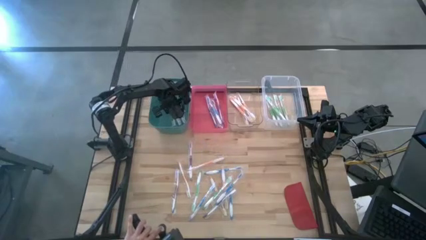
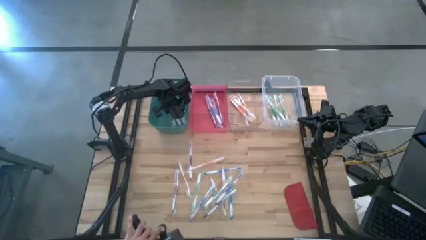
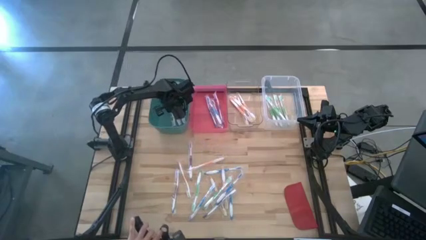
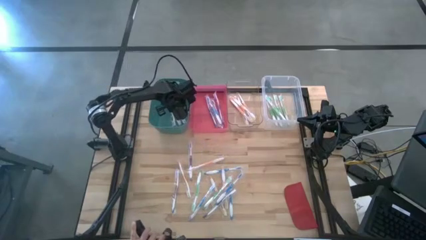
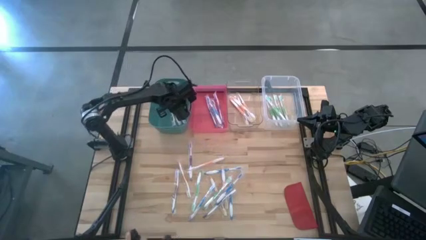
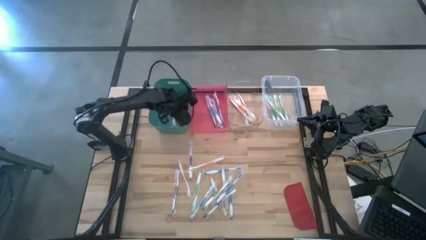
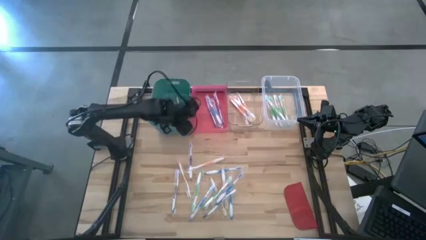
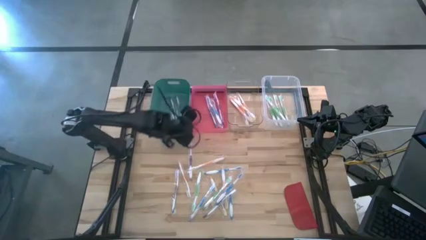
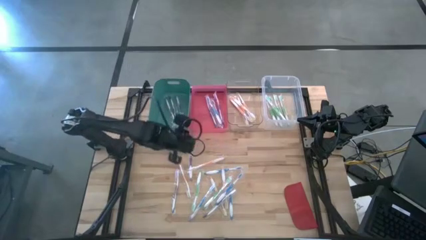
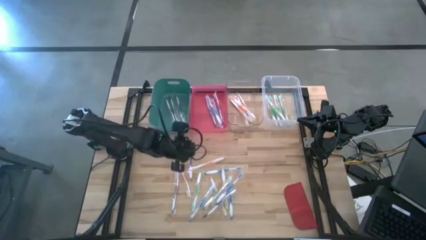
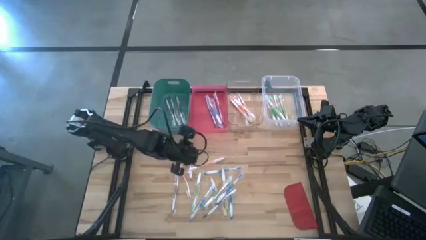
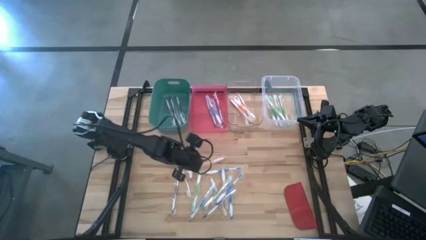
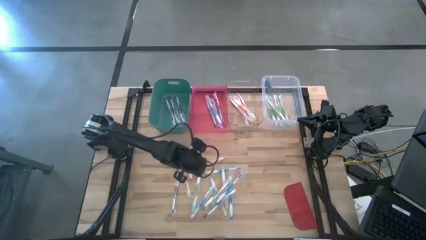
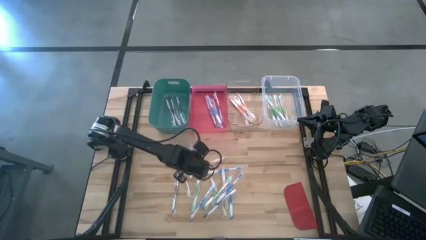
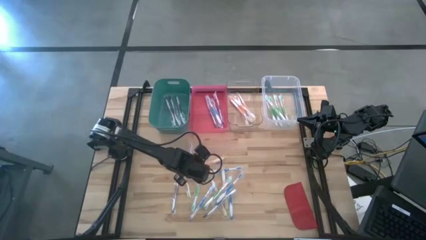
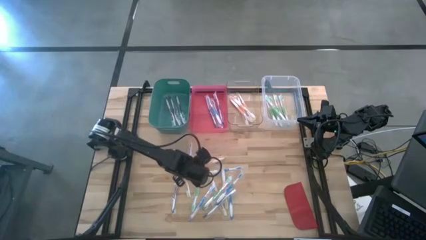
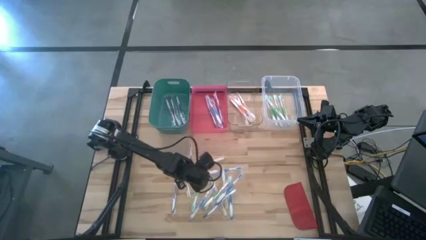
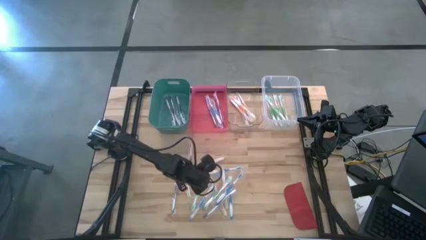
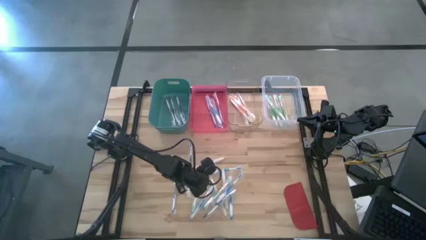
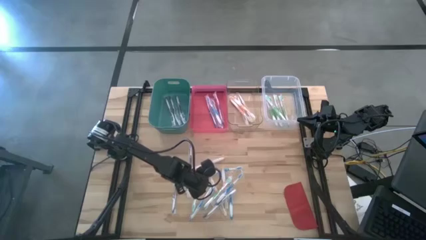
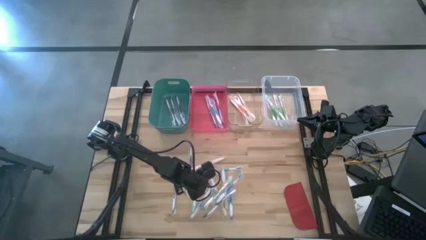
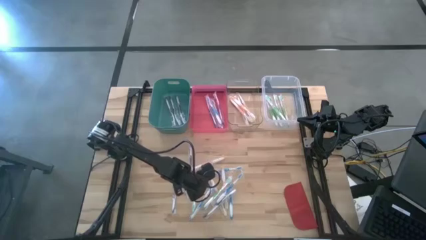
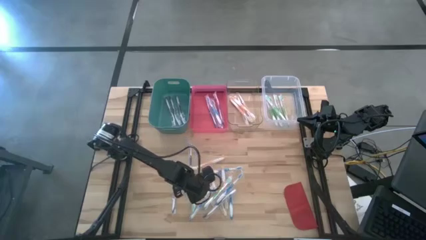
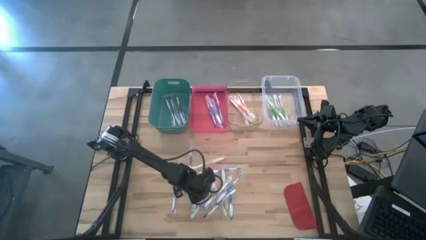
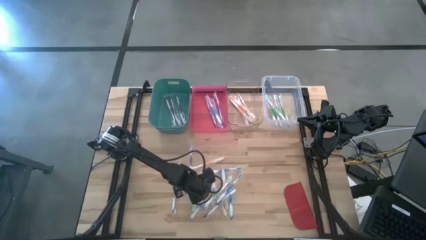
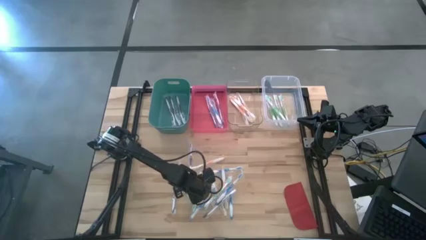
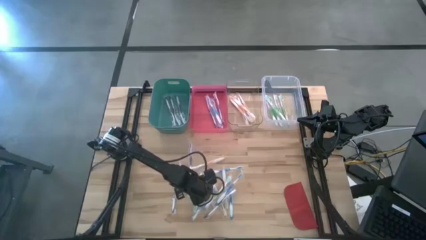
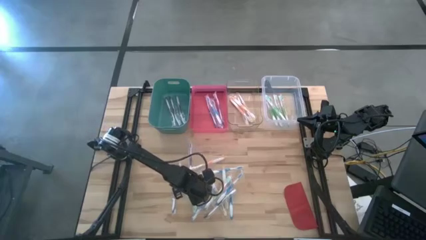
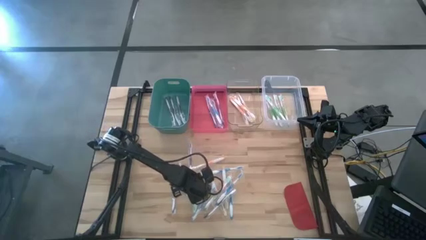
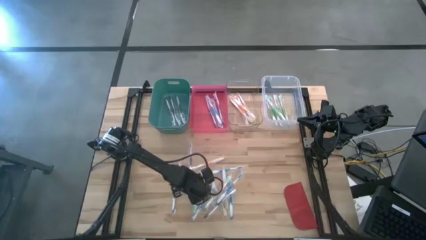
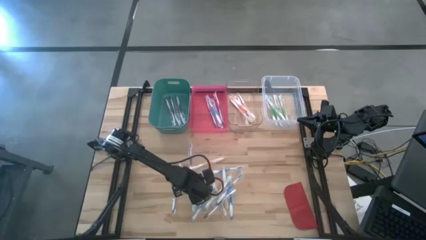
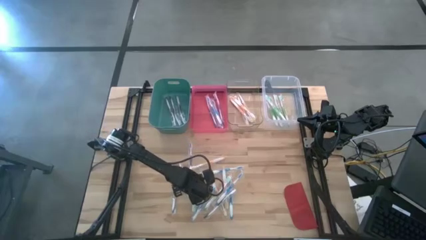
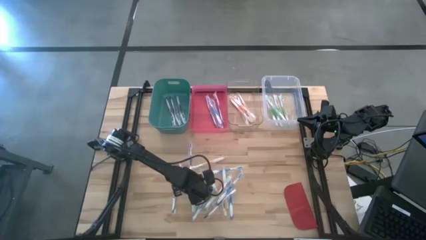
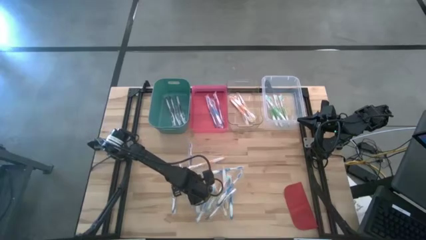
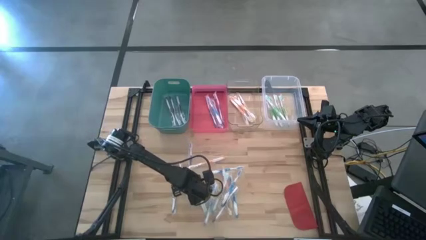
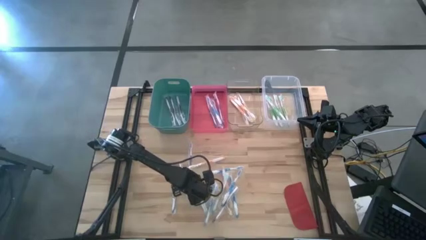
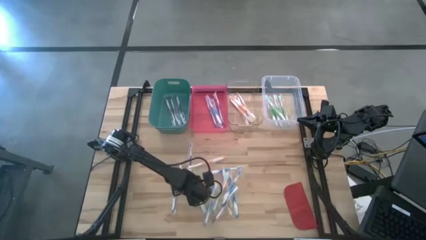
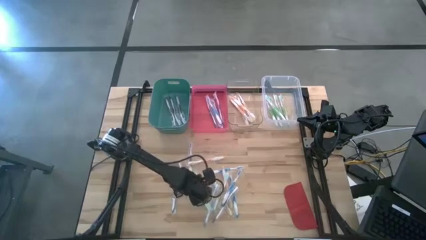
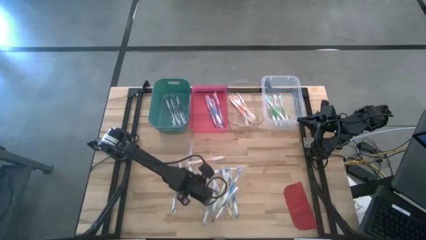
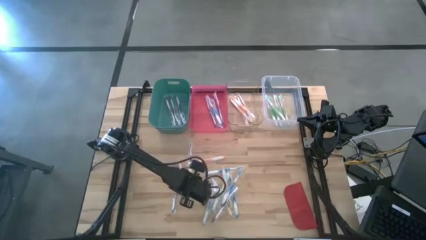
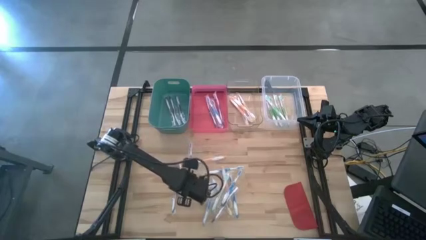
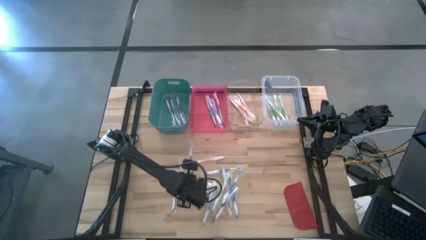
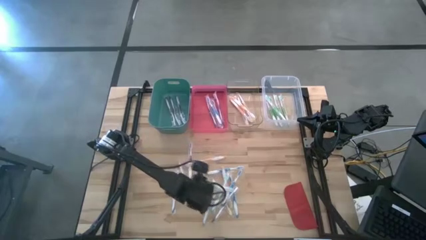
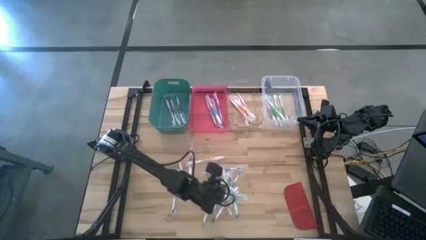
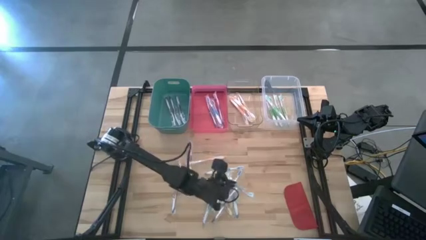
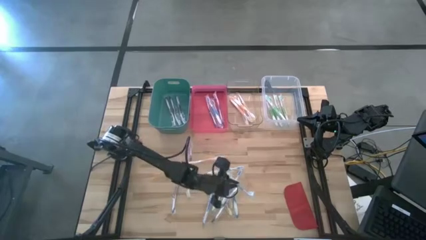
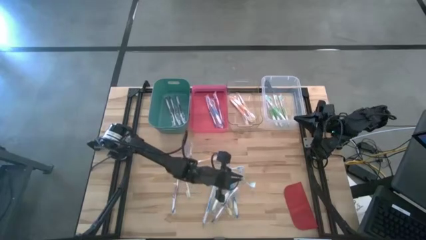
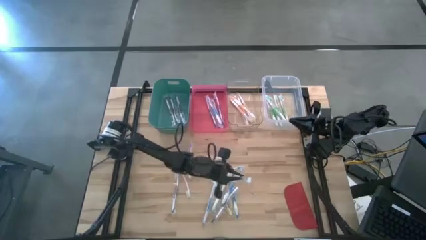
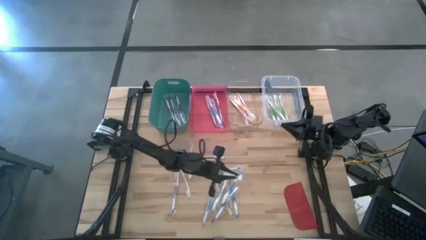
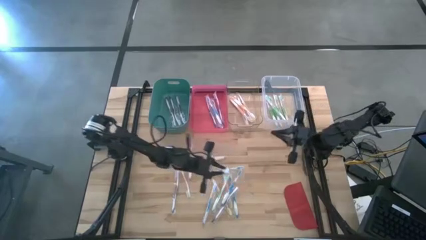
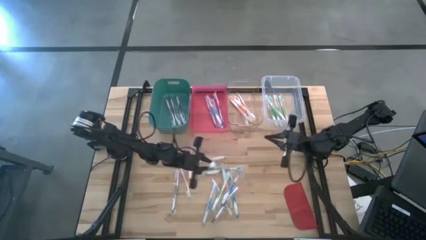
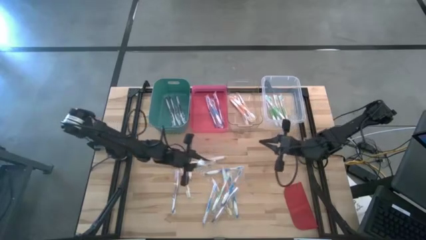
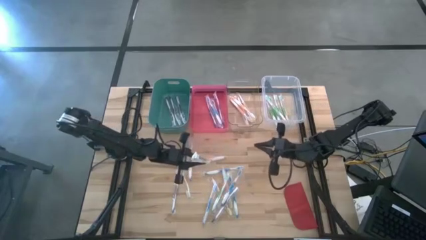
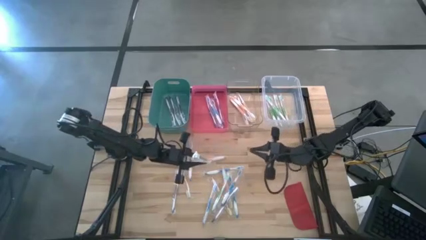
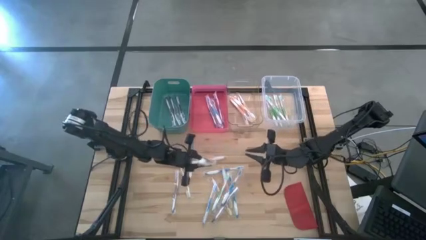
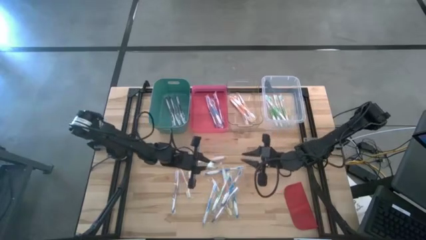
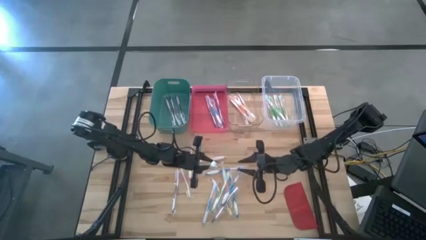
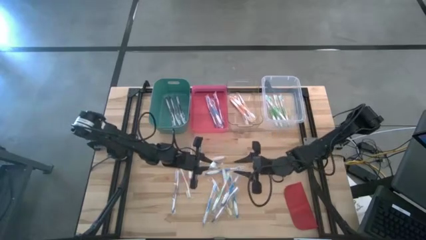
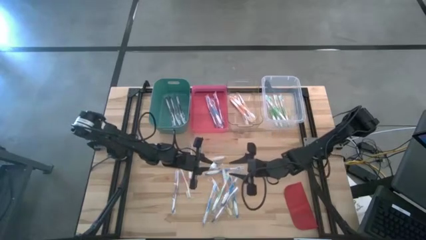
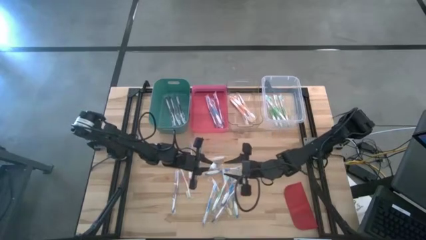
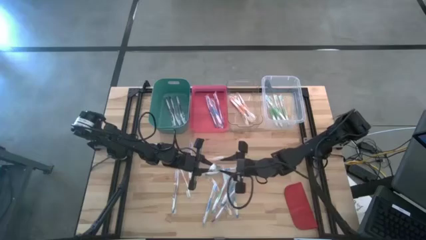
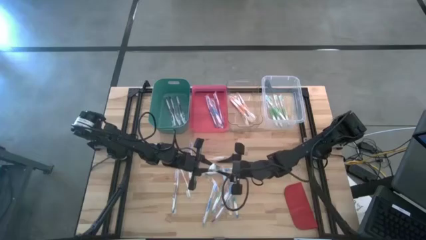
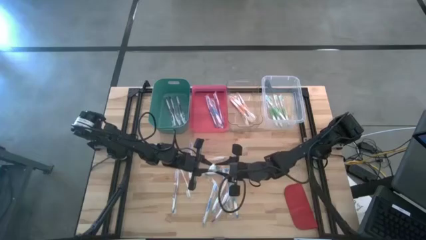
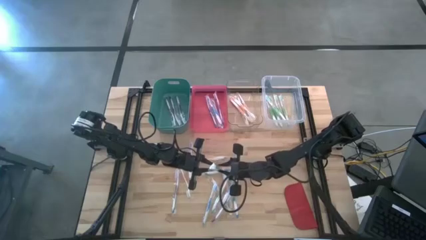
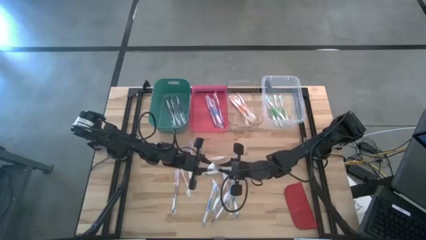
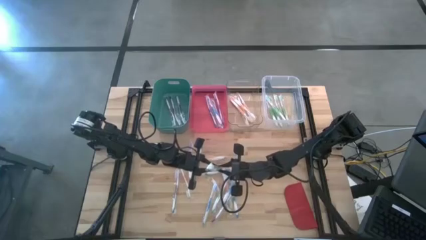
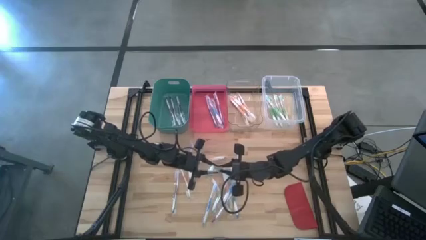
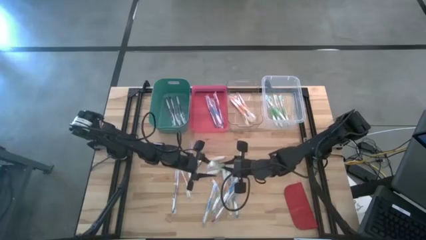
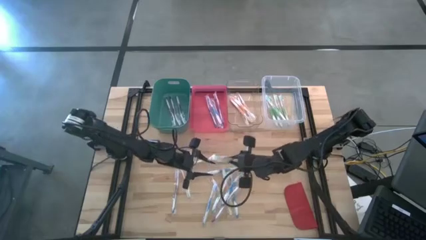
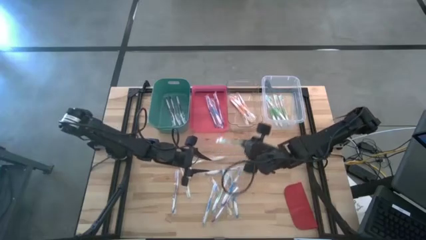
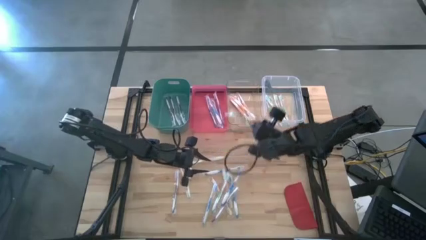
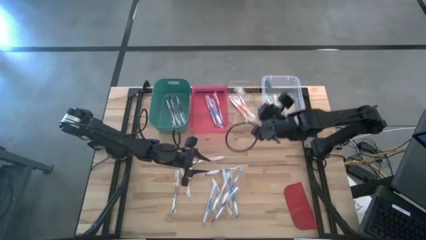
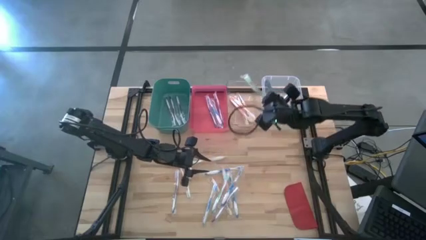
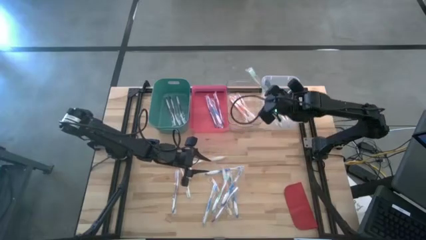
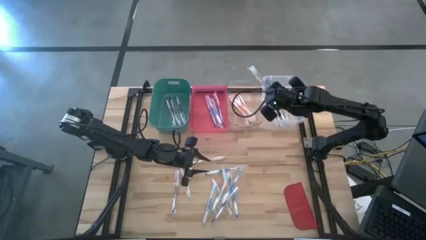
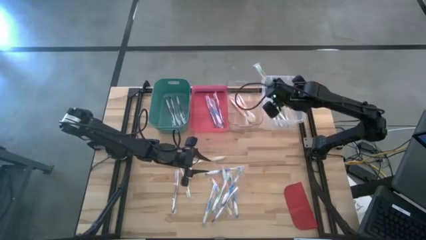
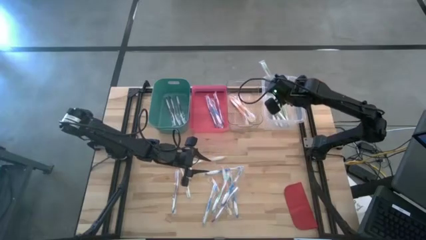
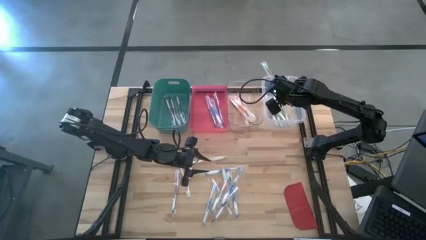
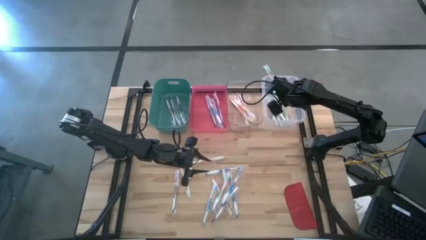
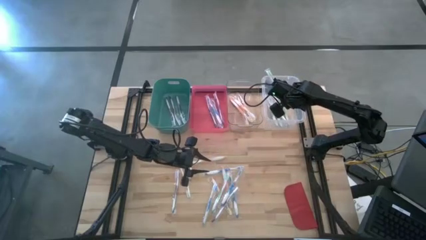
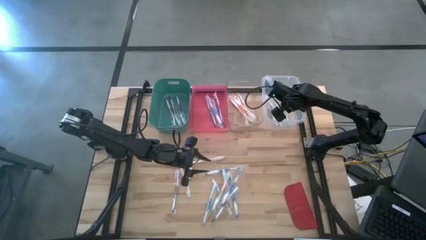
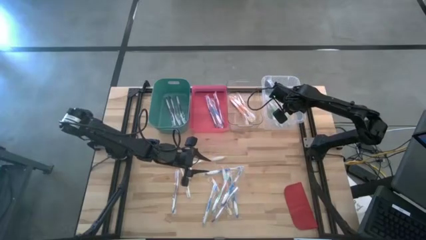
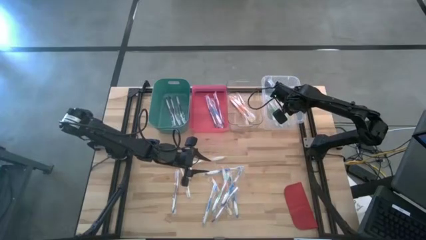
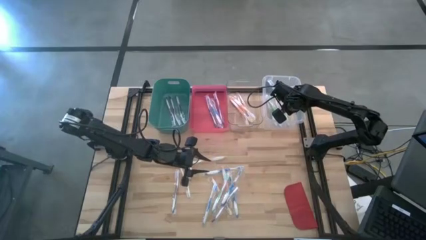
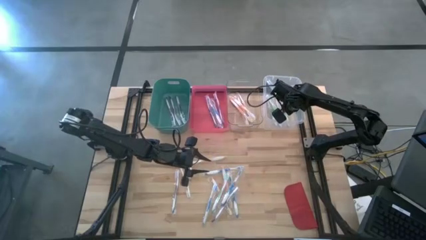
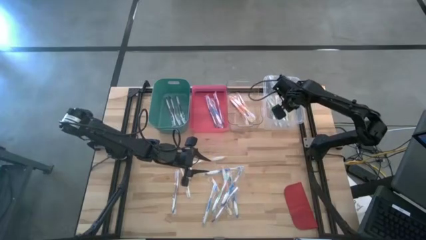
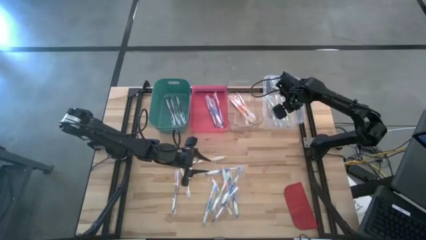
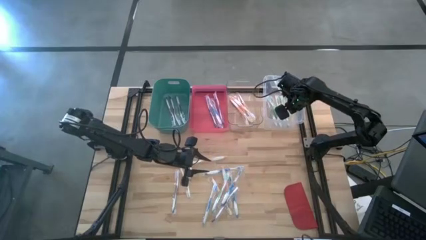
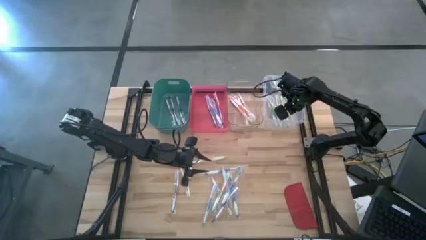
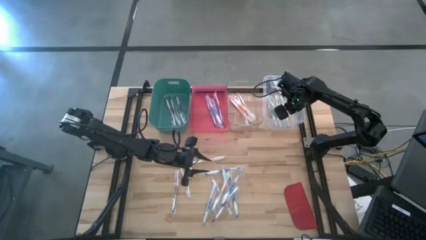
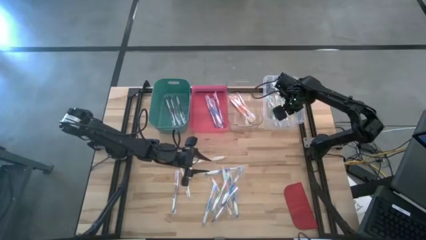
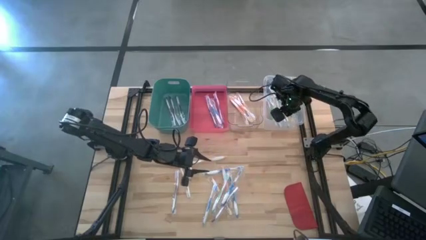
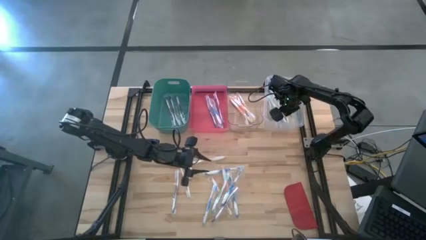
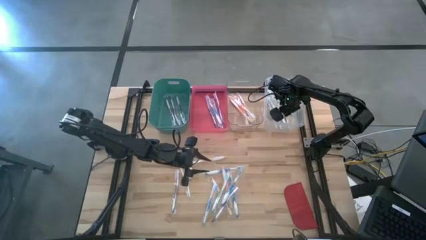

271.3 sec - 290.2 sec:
Task: Pick & Place Toothbrushes
Put the green toothbrush into the white bin
